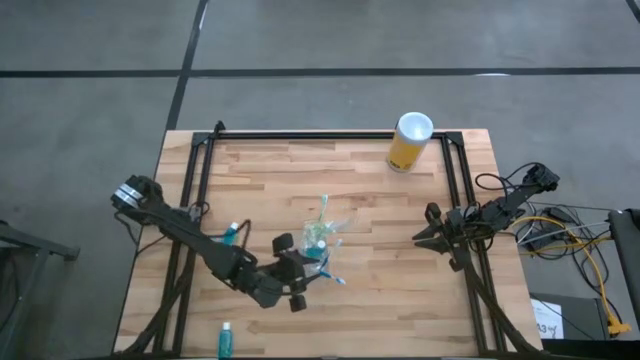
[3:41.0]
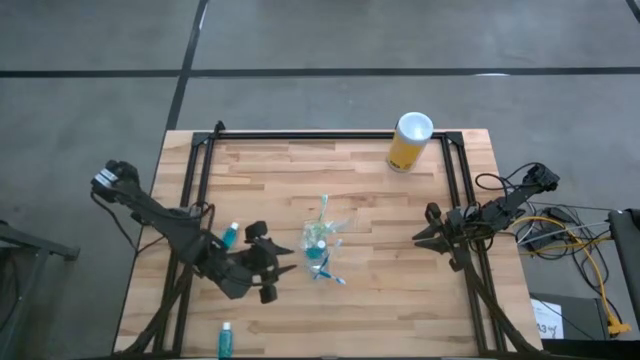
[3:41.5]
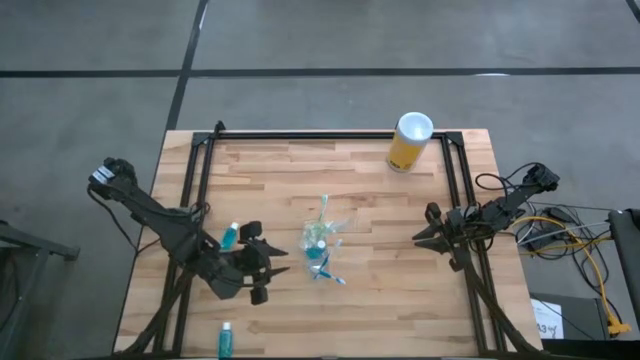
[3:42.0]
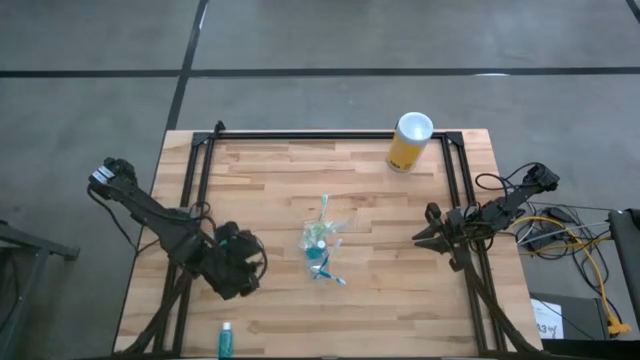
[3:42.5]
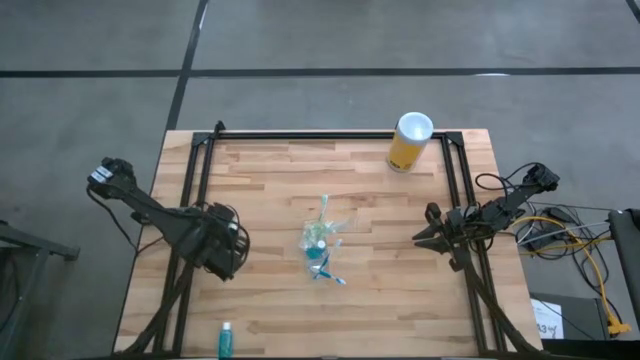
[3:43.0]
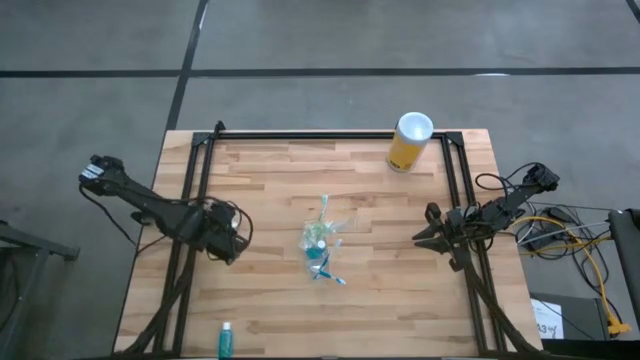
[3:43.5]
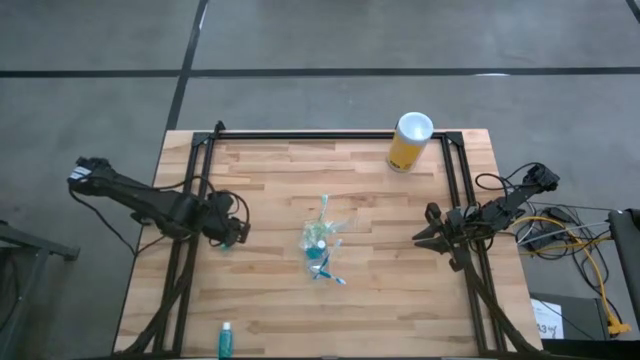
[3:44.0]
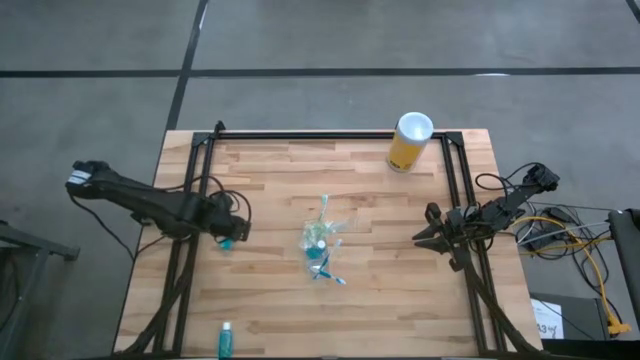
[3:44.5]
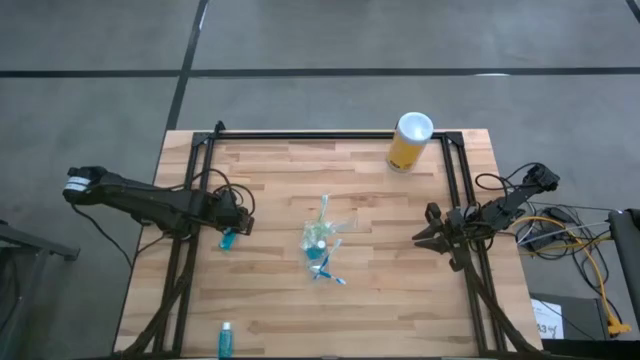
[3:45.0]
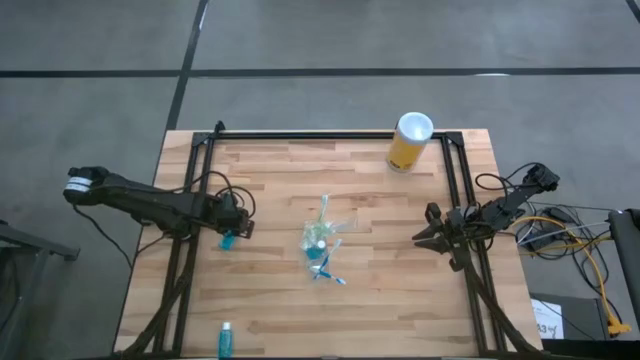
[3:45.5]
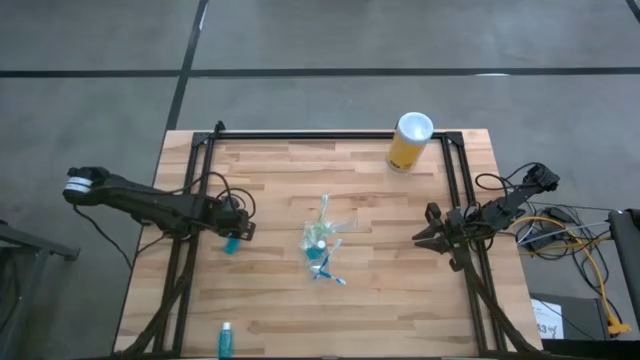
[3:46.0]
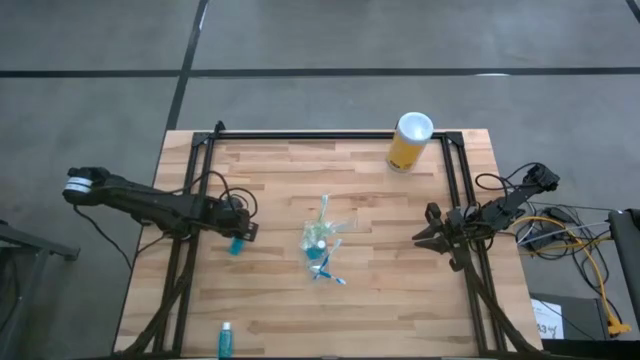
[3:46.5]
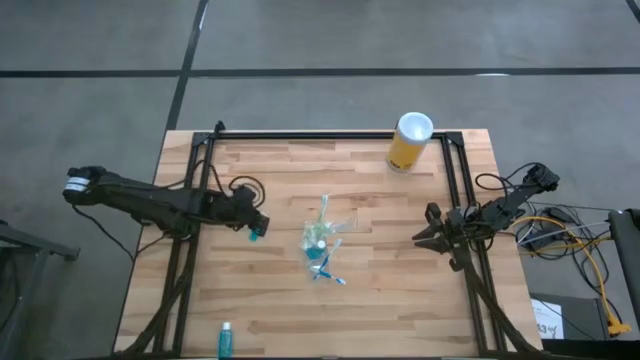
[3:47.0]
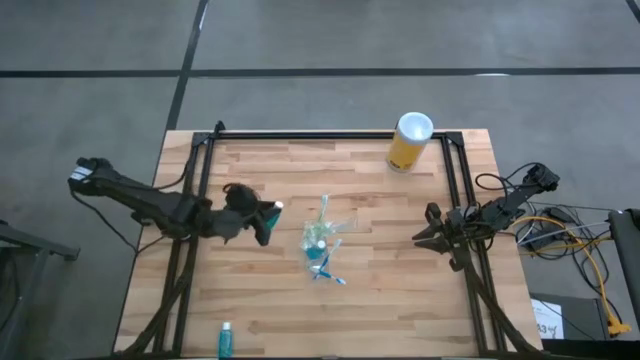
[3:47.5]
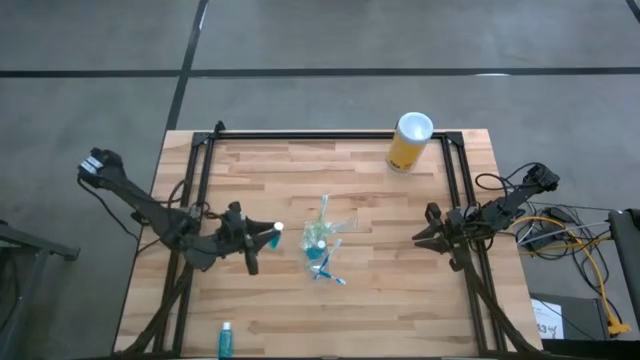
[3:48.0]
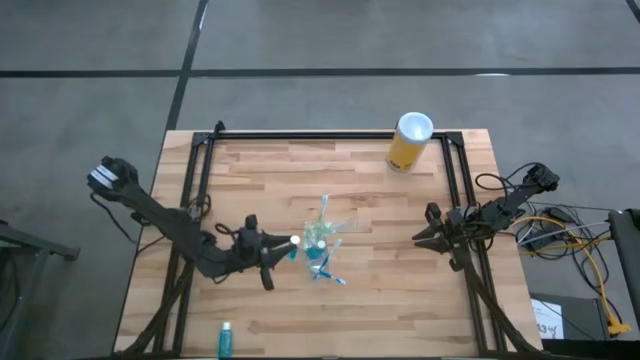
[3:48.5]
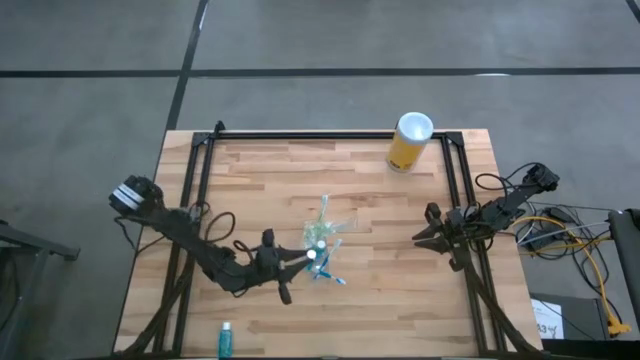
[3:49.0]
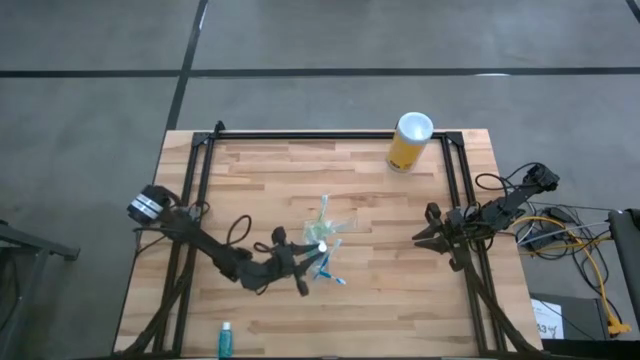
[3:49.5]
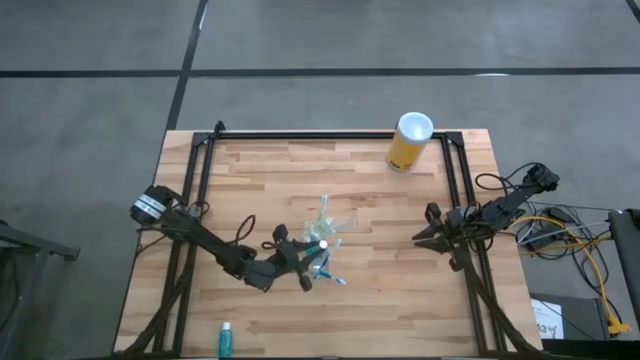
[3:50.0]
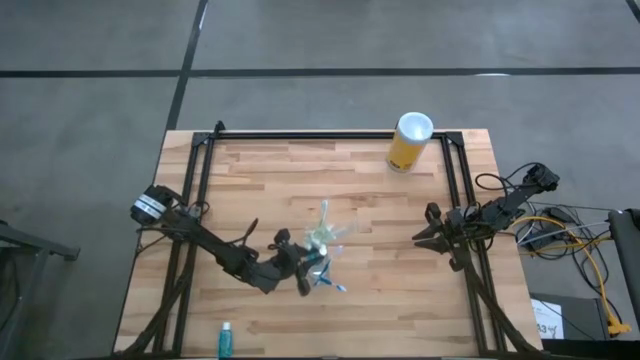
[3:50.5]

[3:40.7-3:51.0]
Task: Pick & Place toothbrushing station
Put the blue mouthwash into the transparent organizer

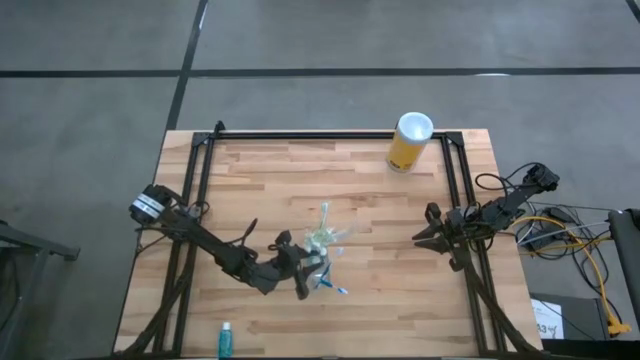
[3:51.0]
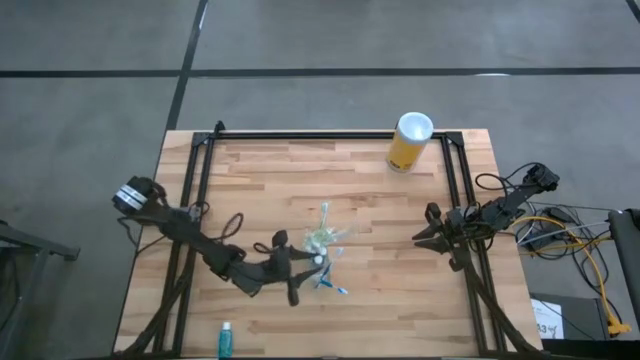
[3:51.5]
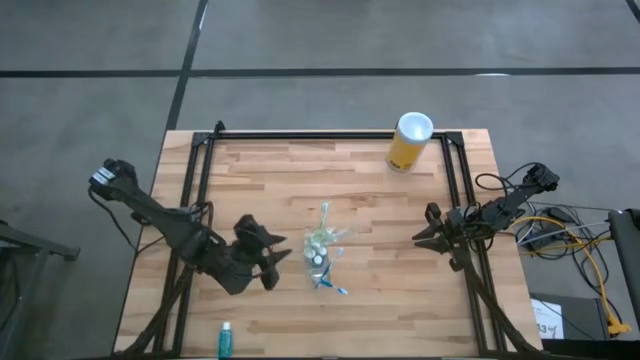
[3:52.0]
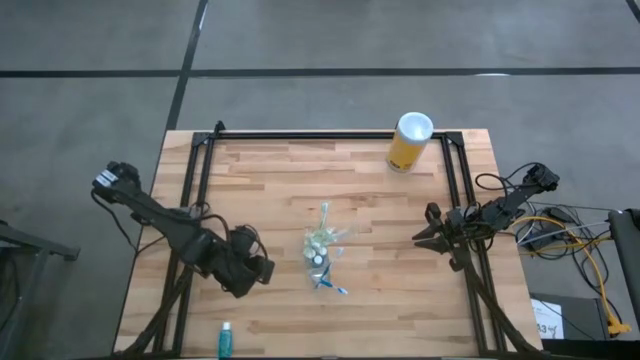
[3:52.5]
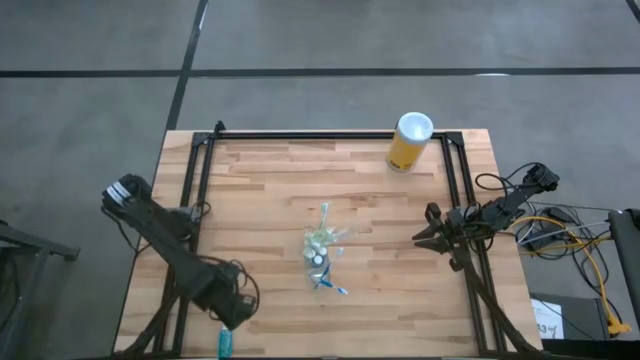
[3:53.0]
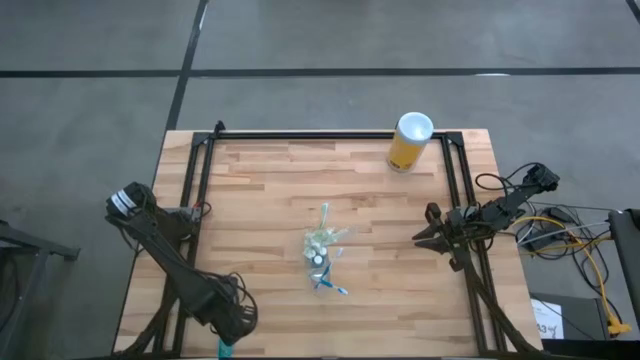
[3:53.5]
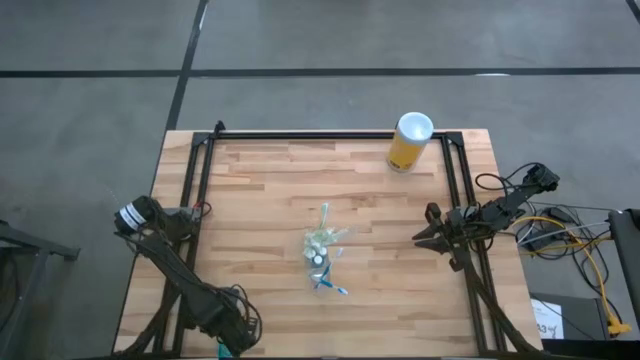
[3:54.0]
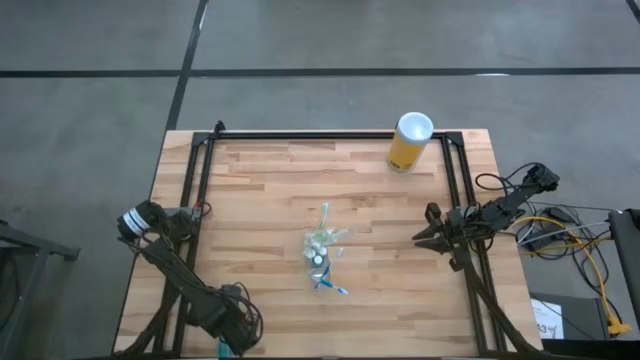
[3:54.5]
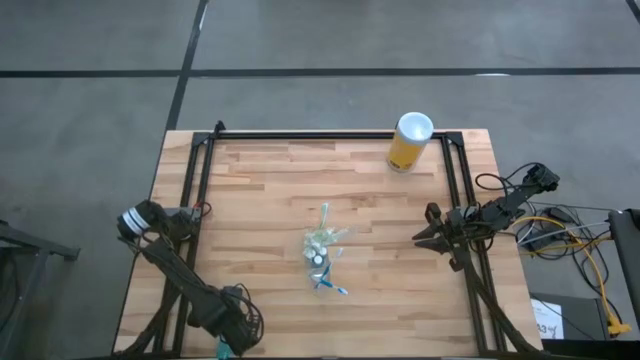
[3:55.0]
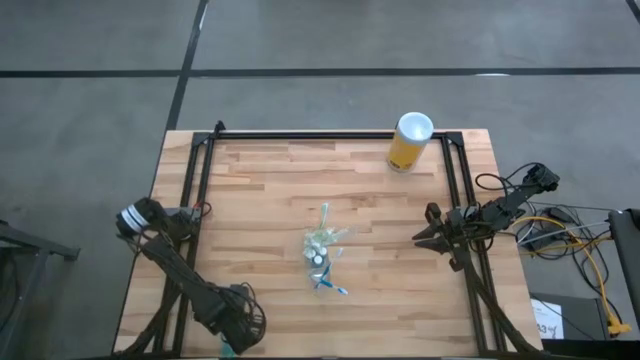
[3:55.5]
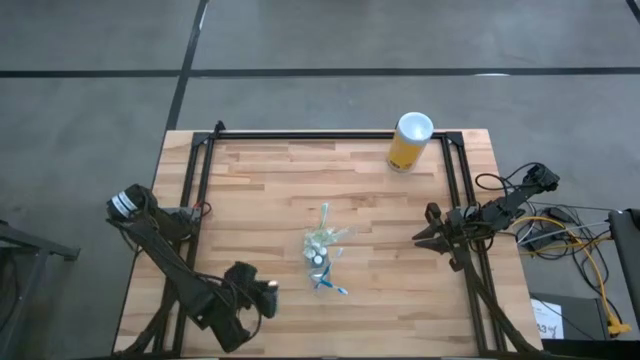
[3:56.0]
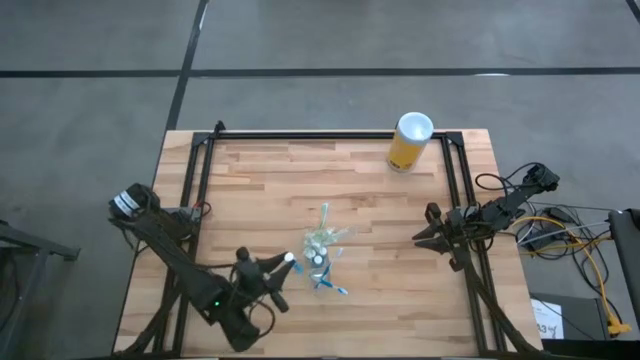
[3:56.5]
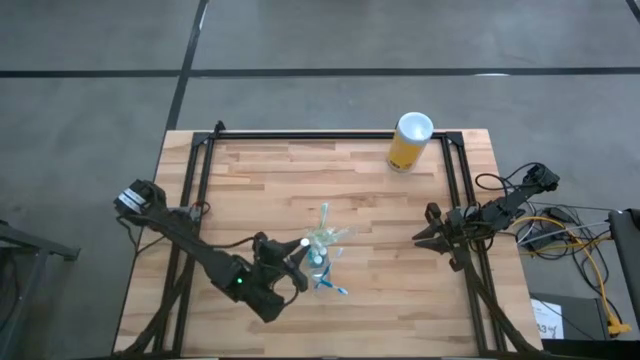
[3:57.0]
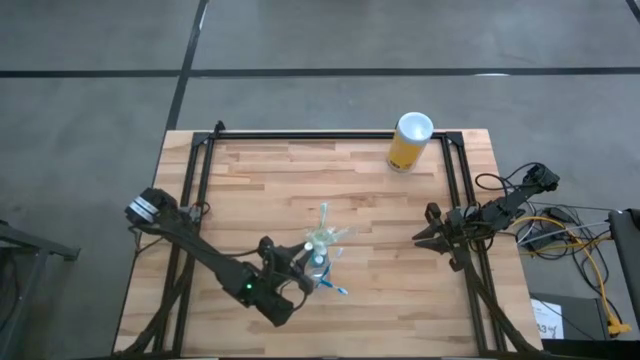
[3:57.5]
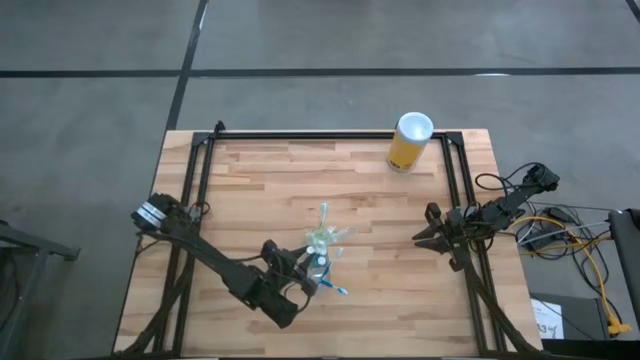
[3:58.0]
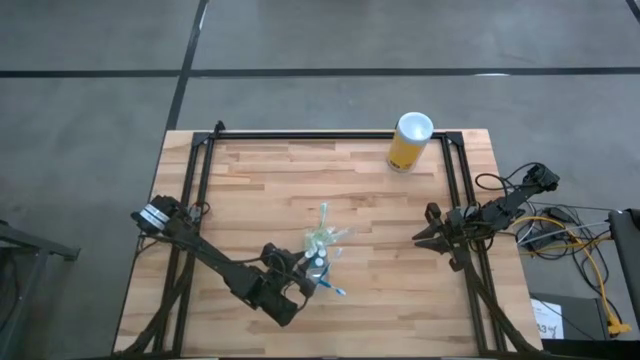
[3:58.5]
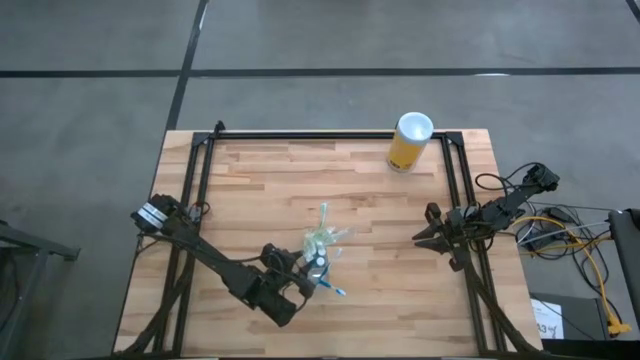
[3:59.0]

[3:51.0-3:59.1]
Put the blue mouthwash into the transparent organizer

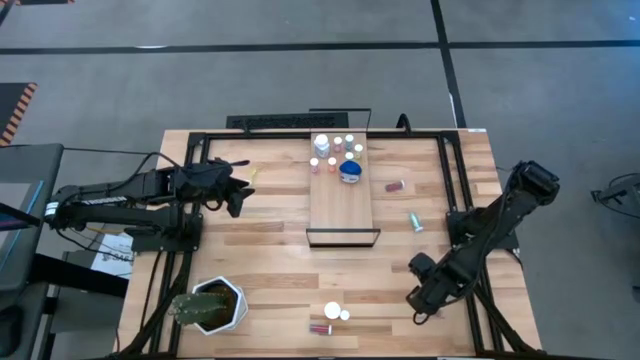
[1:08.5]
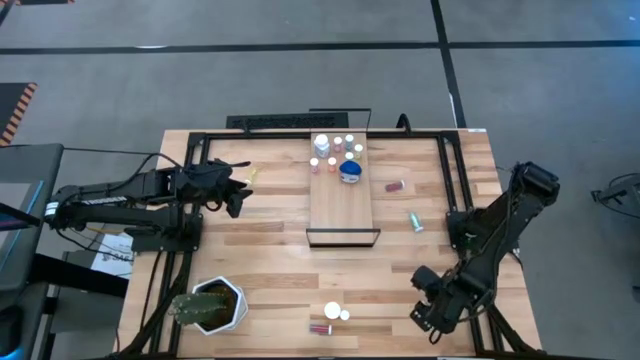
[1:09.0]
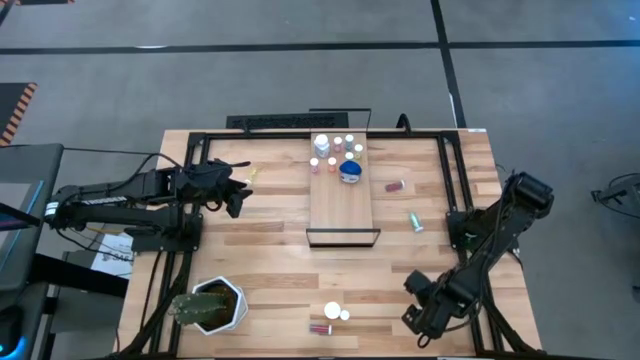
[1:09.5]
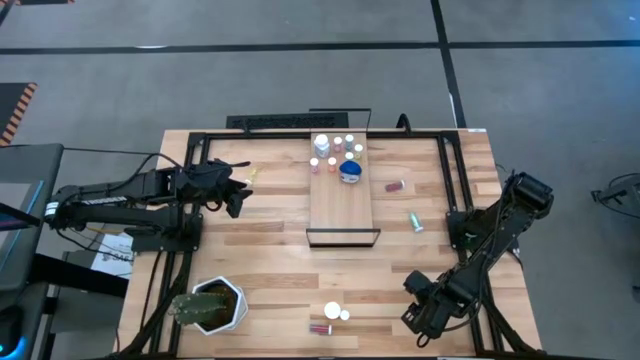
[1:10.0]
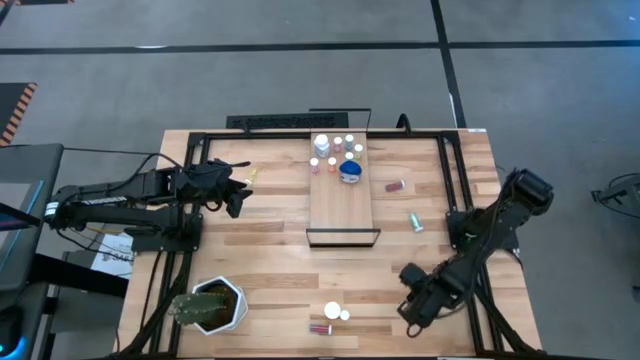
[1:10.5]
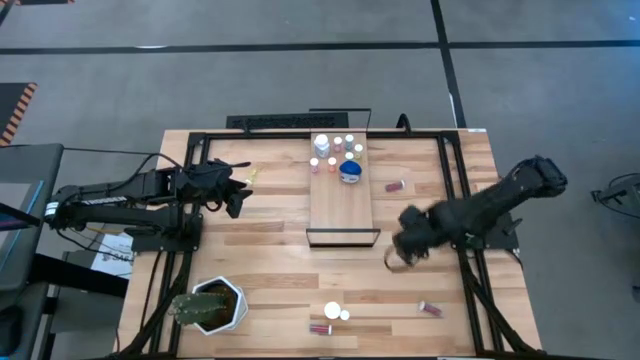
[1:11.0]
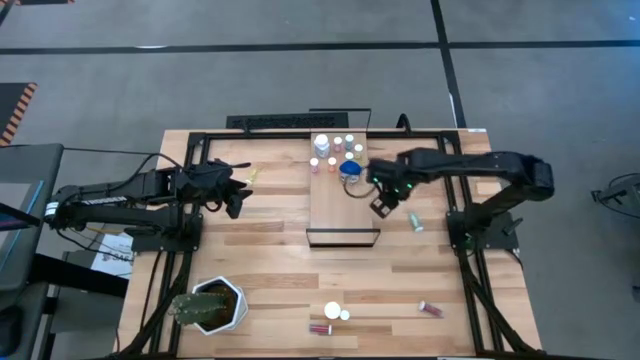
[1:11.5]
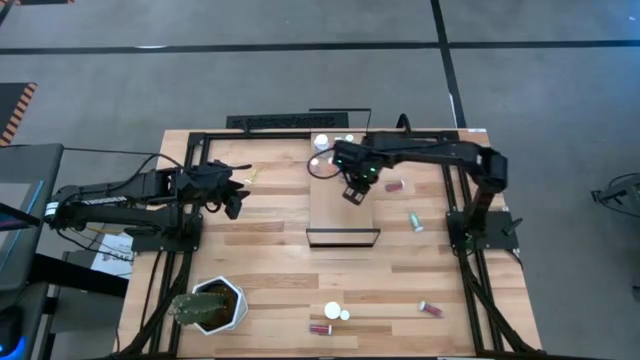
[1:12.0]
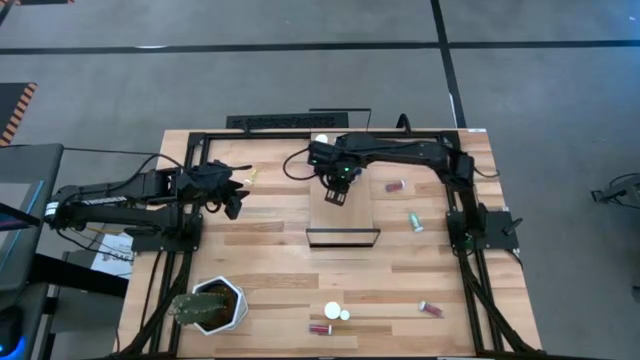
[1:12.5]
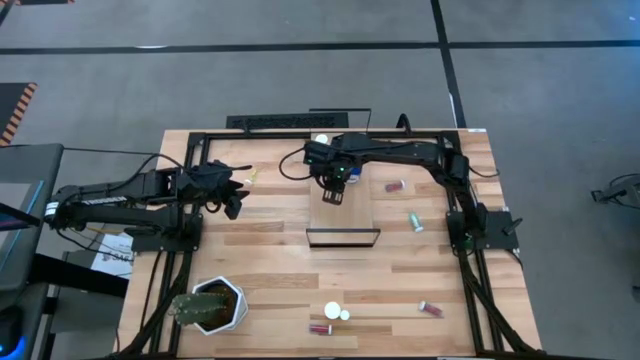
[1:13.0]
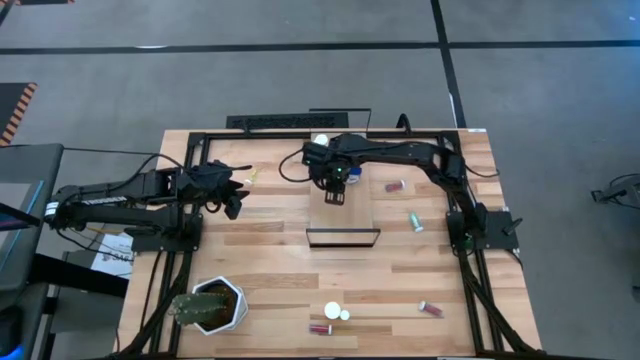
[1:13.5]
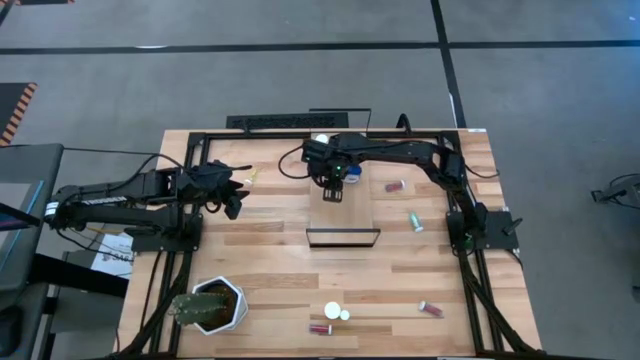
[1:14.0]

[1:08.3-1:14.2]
Task: Pick and place medicine bottles onto shelf by color
Put the yellow pill bottle on the shelf
